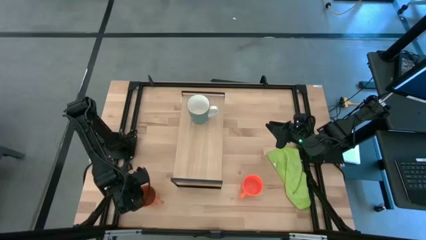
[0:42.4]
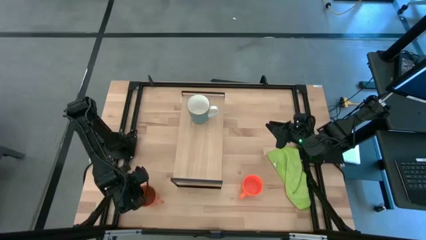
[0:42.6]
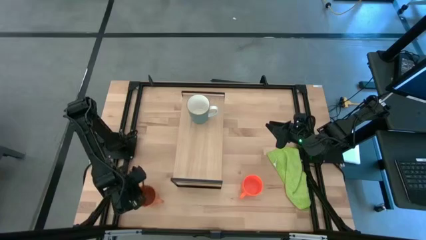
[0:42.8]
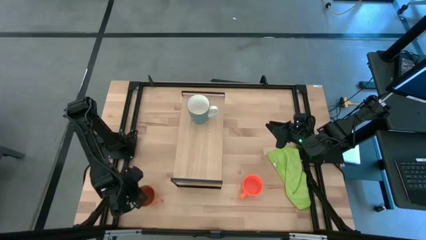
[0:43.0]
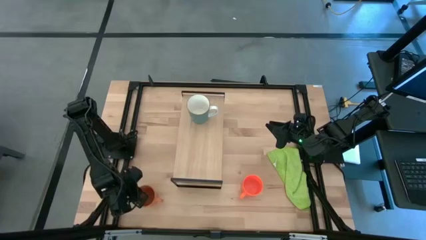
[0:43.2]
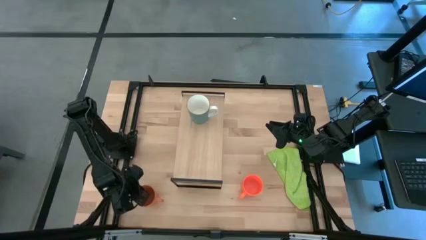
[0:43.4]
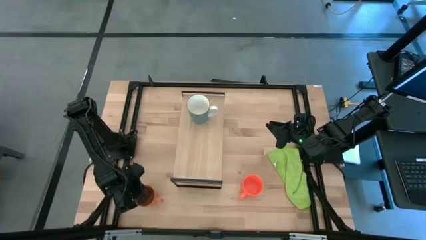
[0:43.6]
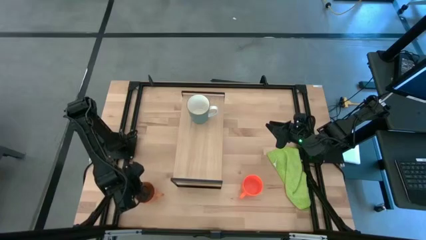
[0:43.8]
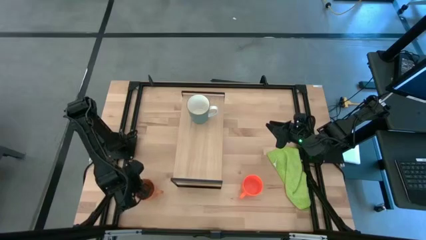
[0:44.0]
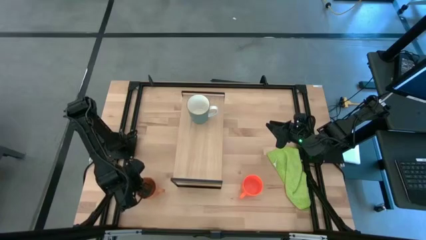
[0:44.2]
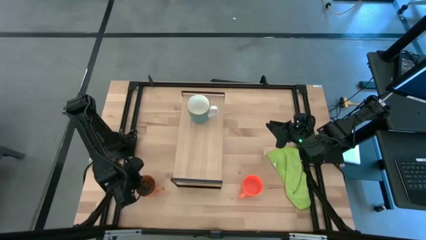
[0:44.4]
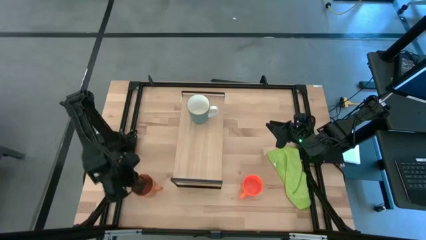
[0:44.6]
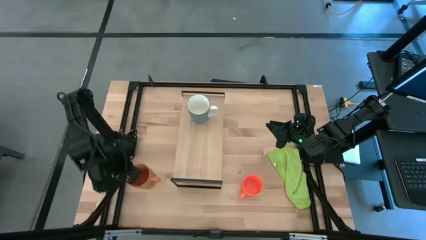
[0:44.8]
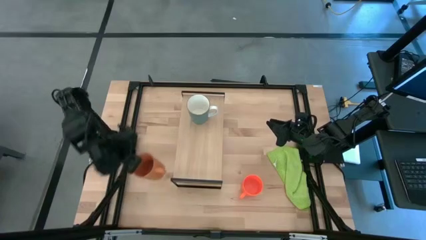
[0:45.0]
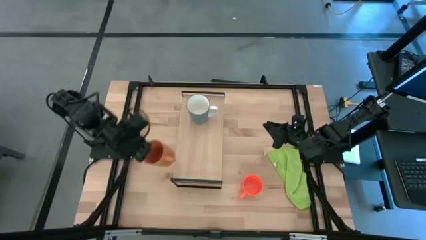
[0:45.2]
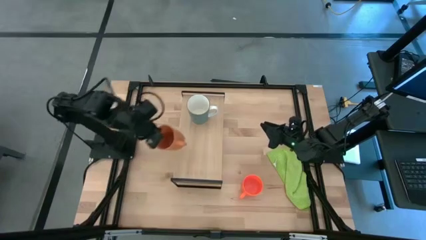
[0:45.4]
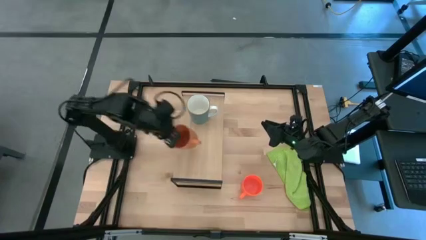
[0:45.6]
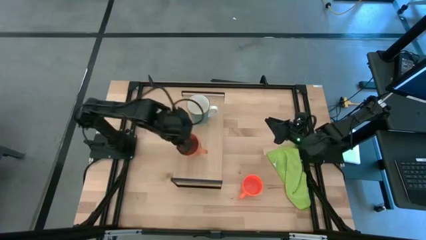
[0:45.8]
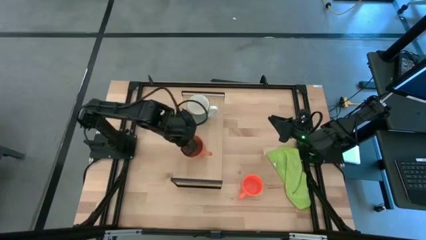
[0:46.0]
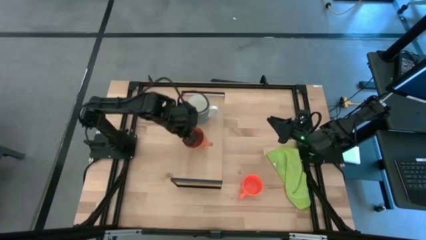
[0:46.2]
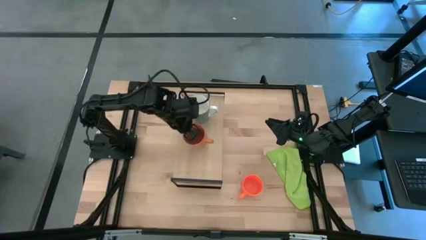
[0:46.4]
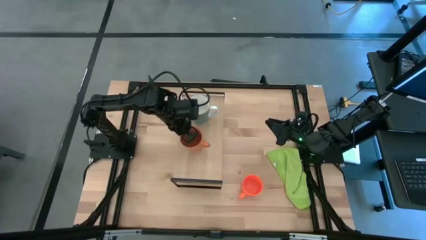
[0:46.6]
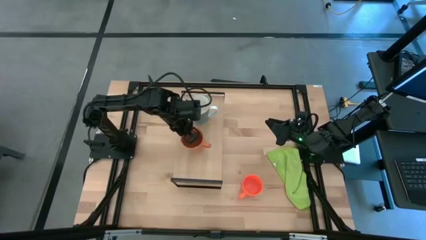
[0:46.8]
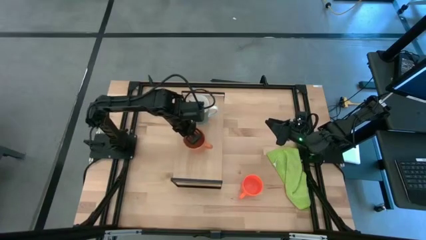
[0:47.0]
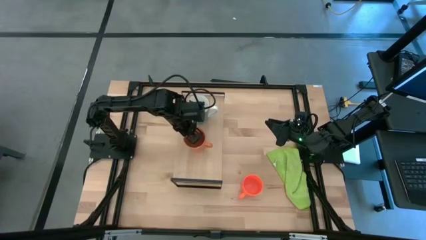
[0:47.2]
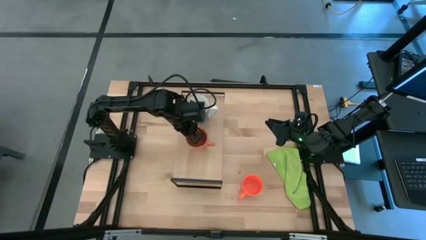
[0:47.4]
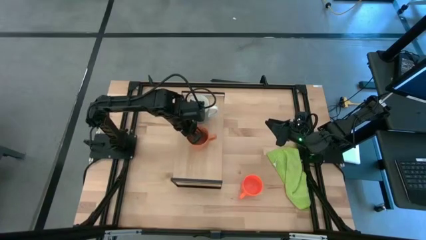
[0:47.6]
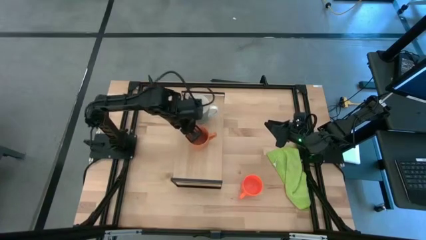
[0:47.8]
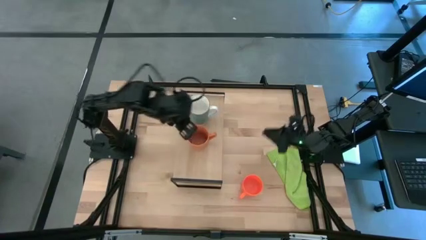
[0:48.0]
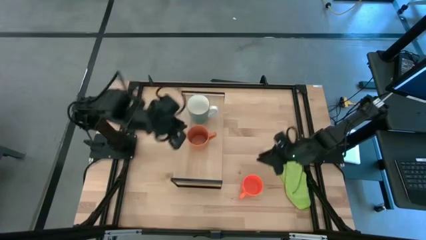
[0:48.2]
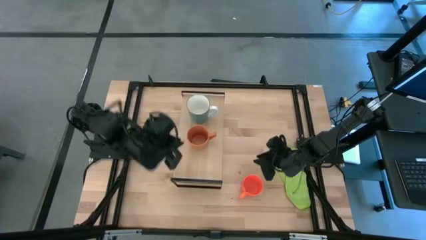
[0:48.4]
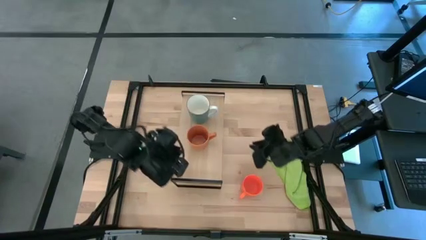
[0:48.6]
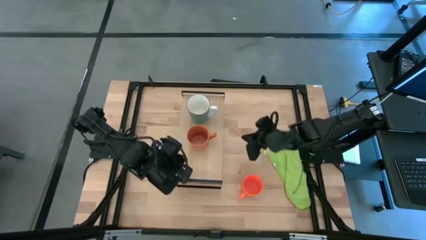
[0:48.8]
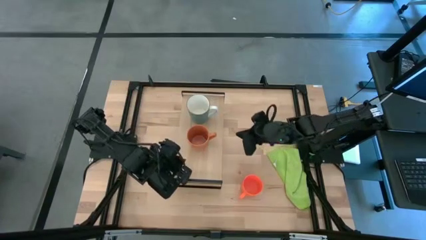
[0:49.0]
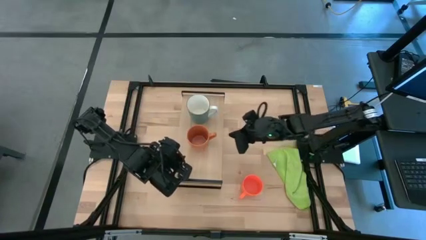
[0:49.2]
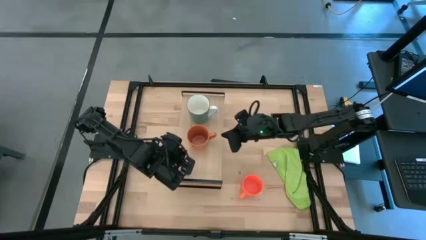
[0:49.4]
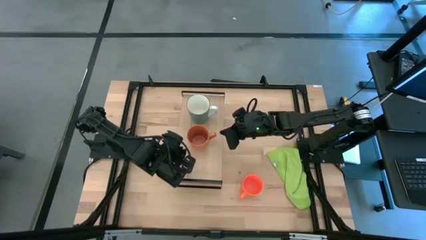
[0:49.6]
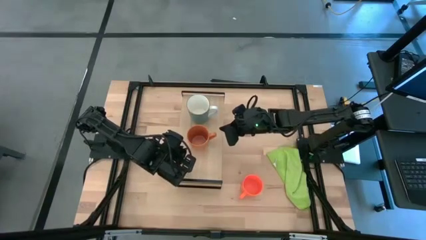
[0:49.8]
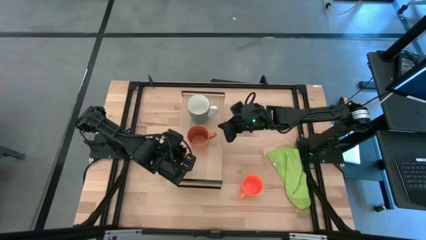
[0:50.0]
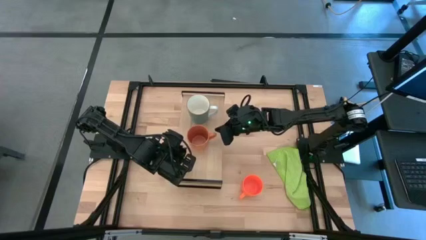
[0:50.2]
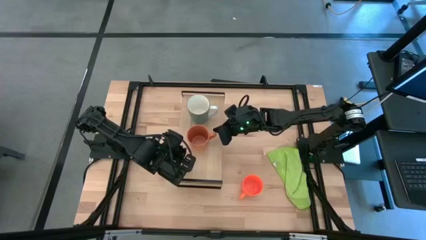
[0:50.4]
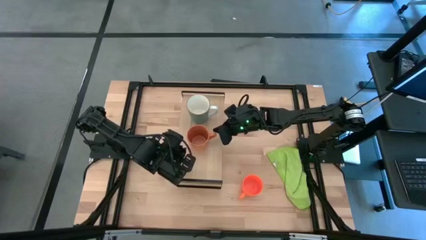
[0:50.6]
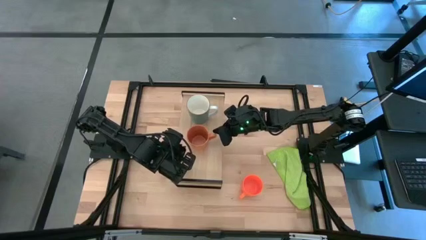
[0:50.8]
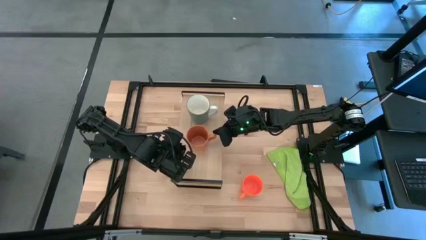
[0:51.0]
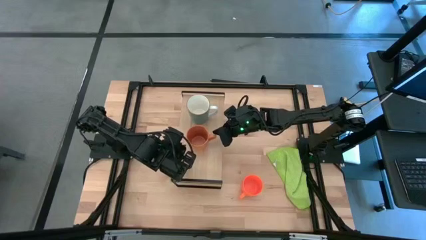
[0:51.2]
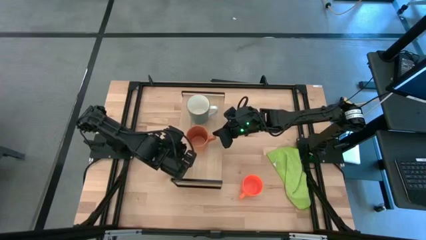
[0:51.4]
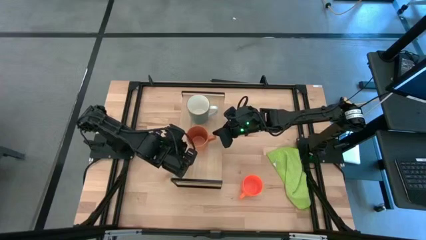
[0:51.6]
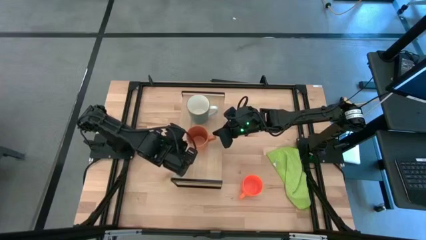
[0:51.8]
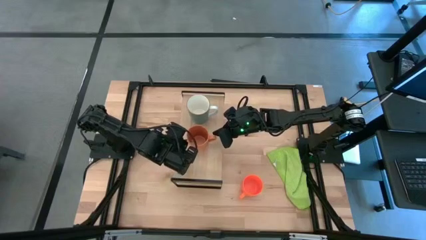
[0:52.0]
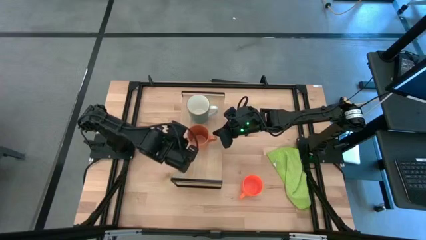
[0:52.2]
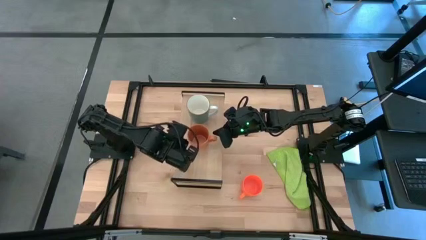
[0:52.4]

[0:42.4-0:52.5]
Task: Stack small to large cups/mugs on shelf
Put the dark orange mug on the shelf

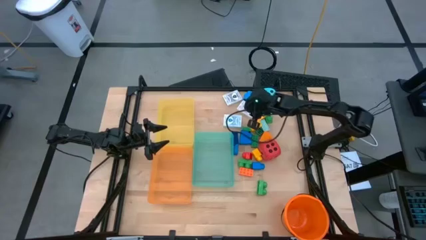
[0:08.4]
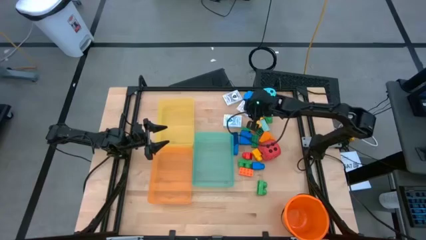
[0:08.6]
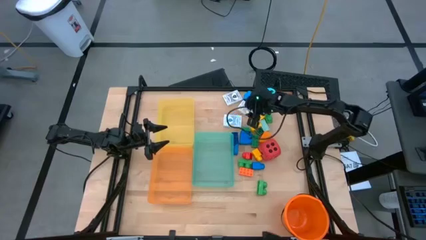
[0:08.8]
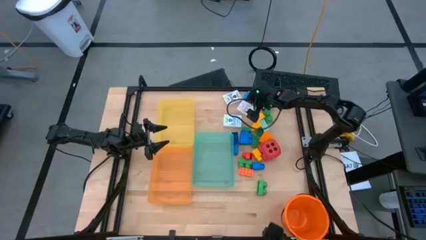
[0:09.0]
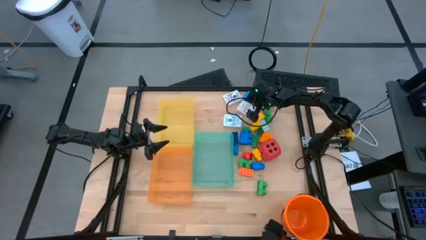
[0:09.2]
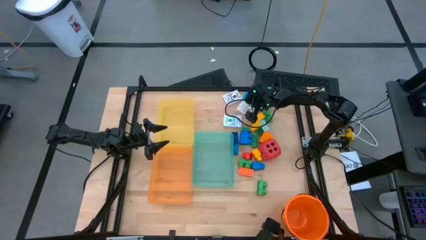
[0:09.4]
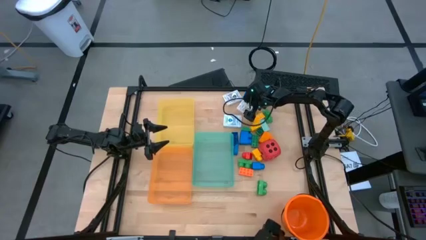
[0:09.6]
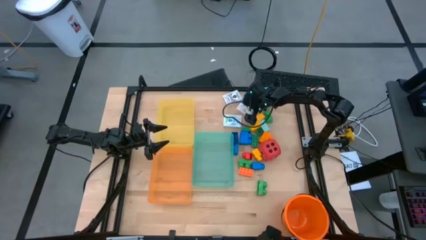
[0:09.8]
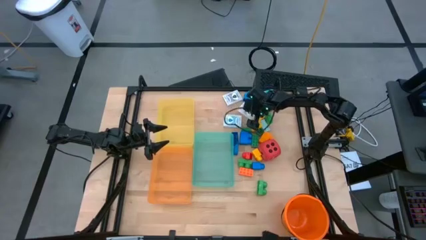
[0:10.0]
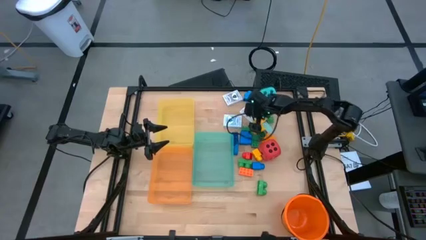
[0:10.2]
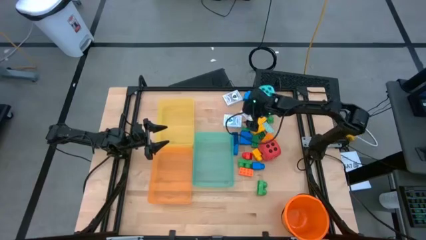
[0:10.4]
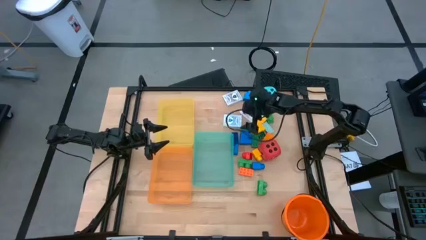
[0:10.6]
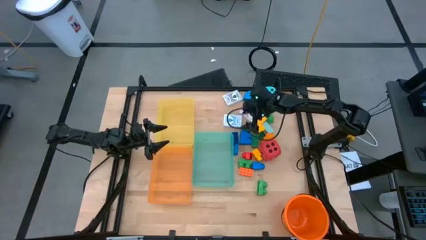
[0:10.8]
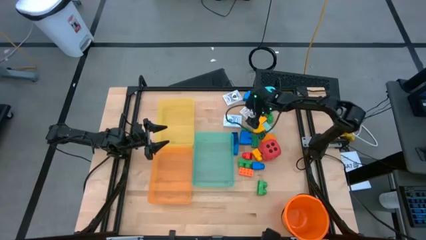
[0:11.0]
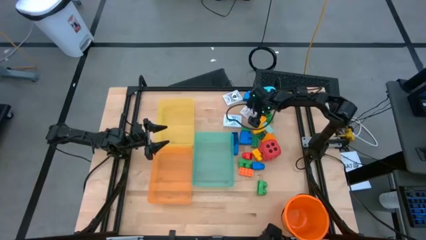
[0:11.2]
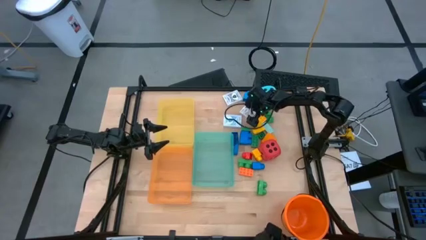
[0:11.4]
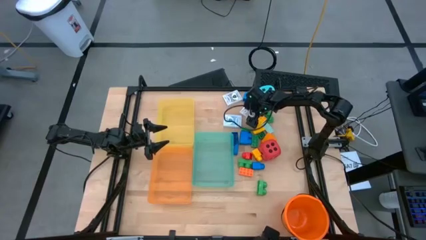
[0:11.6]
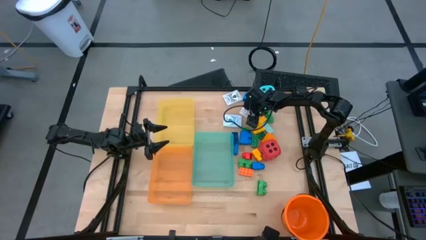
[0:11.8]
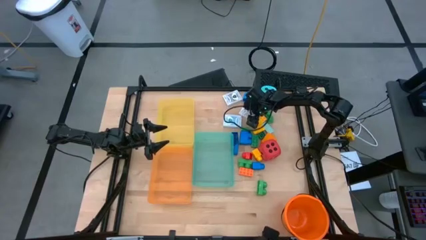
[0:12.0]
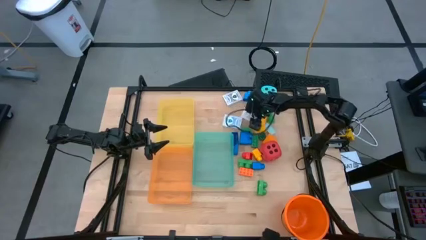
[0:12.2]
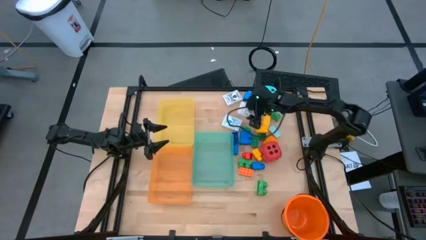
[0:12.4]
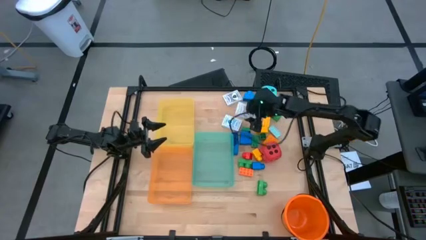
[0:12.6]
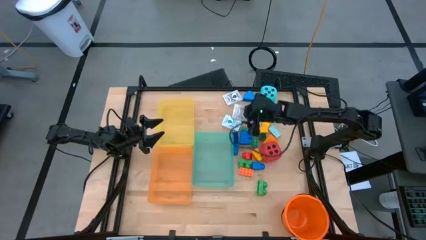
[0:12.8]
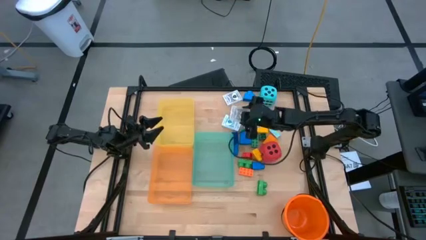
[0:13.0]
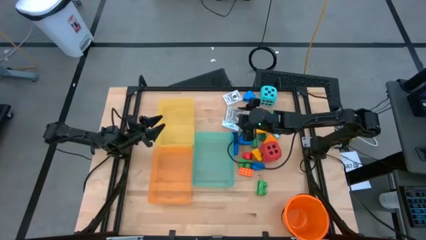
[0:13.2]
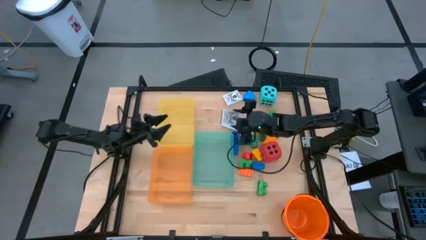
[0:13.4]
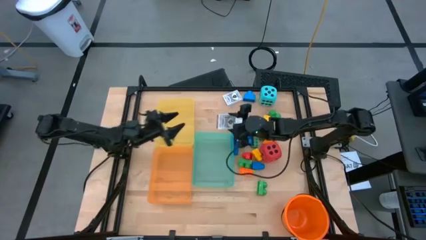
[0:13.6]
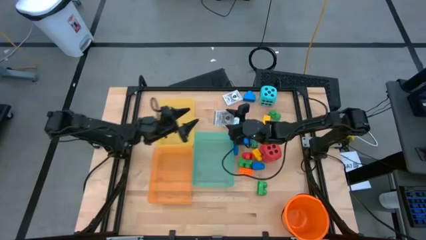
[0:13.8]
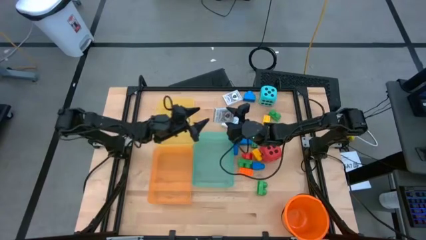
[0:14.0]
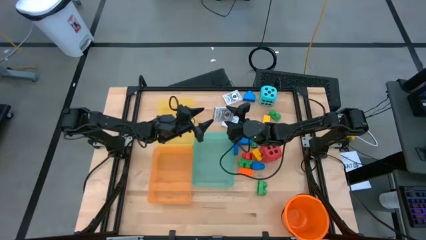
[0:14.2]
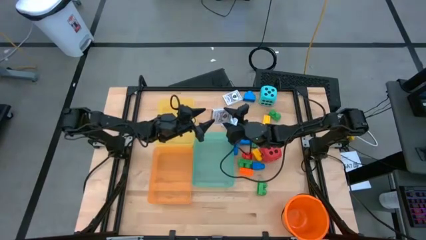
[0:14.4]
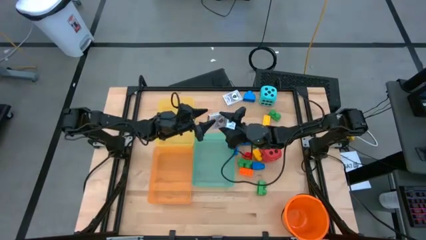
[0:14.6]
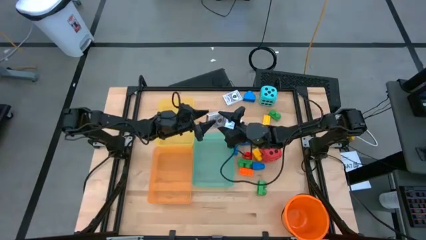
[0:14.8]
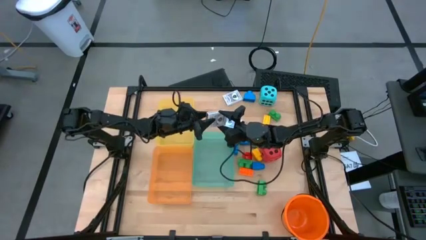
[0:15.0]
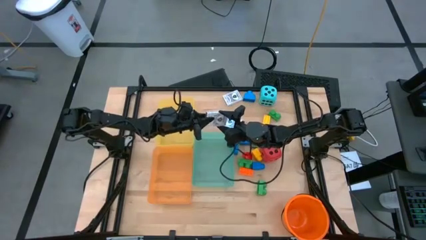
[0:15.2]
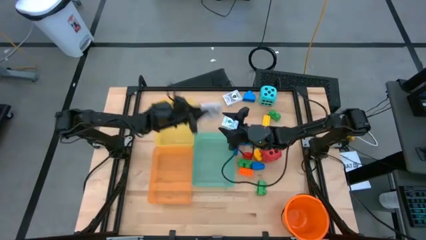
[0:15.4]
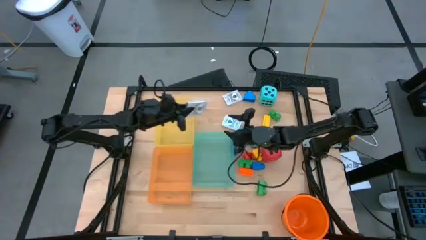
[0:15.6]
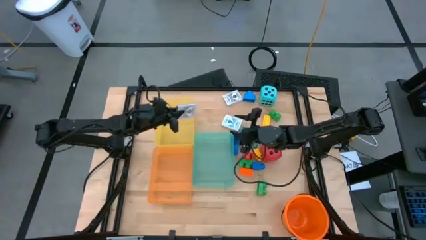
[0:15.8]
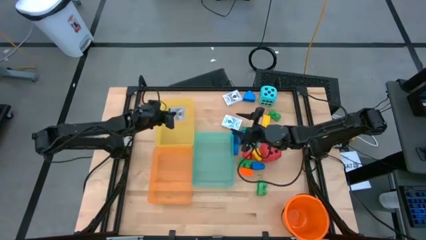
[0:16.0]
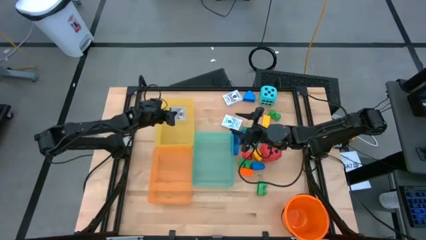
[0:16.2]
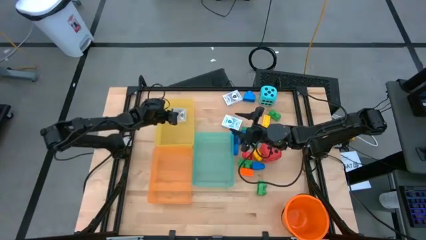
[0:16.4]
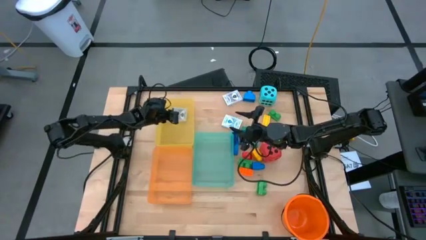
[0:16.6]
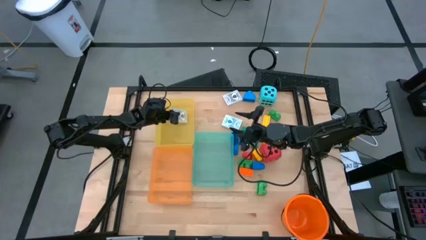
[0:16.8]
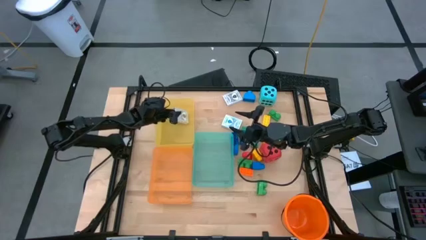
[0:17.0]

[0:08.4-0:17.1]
Task: Pick & Place Toys
Put the brown deck of cards into the yellow bin
